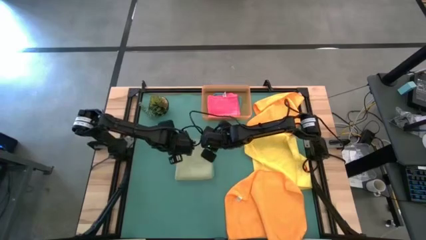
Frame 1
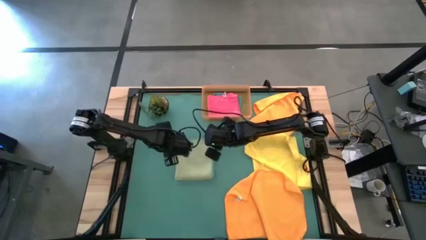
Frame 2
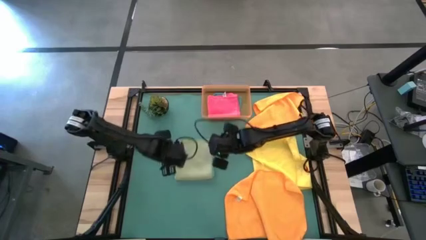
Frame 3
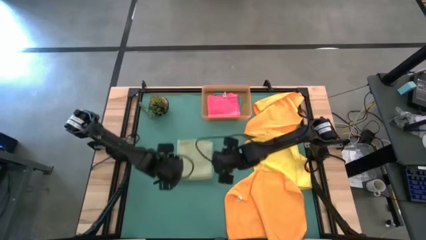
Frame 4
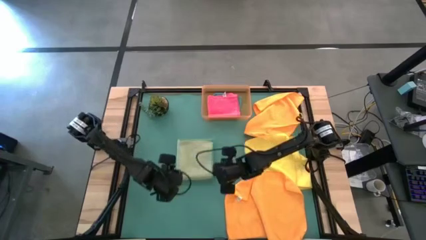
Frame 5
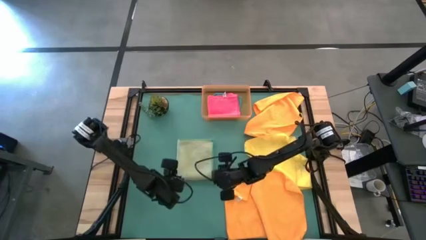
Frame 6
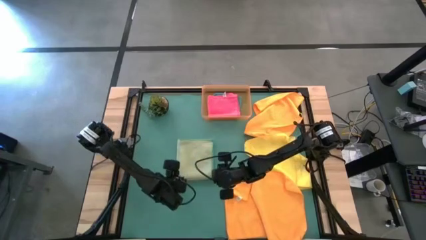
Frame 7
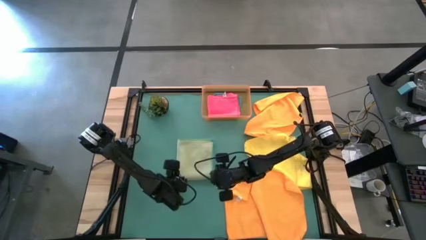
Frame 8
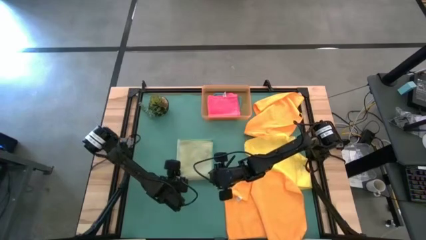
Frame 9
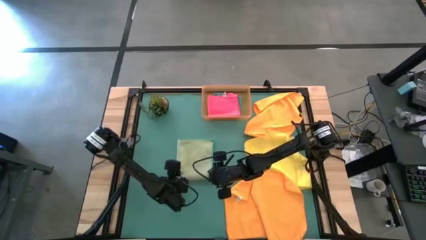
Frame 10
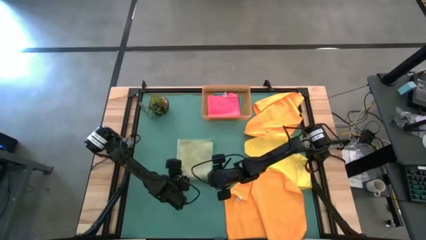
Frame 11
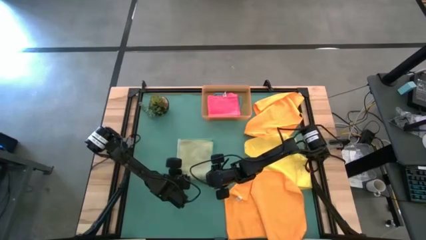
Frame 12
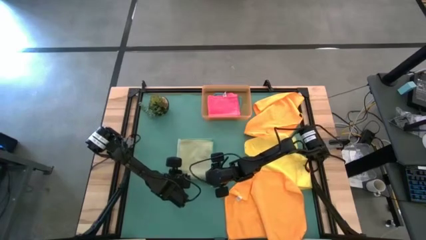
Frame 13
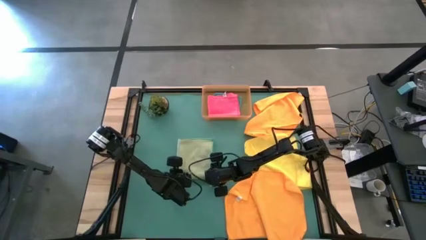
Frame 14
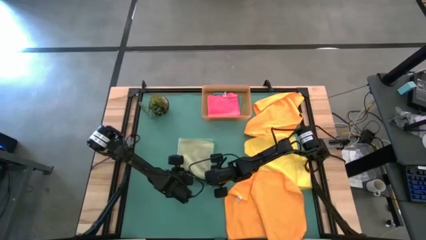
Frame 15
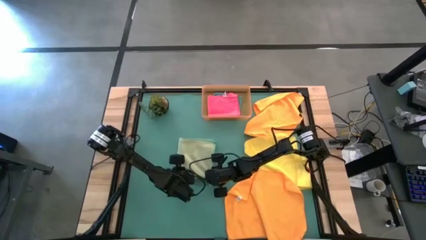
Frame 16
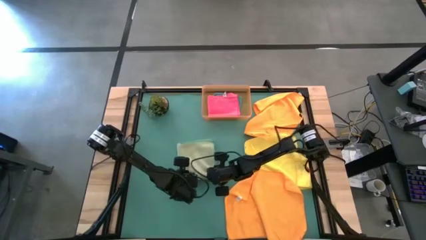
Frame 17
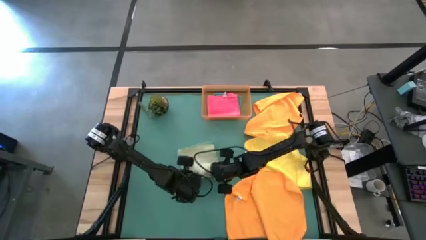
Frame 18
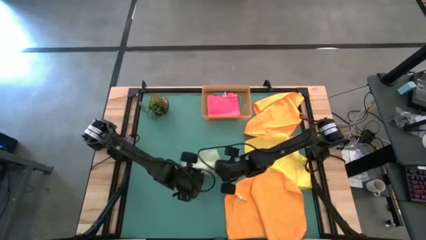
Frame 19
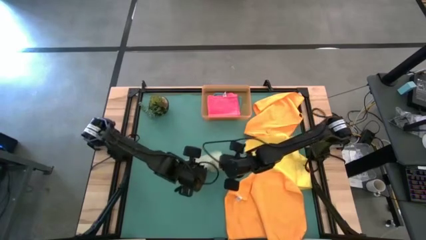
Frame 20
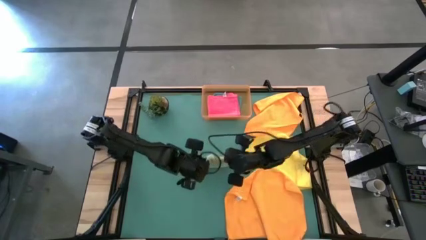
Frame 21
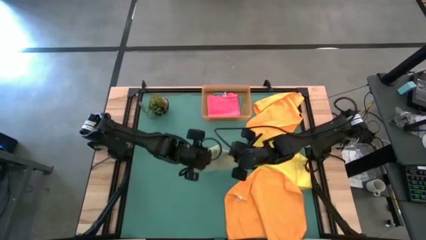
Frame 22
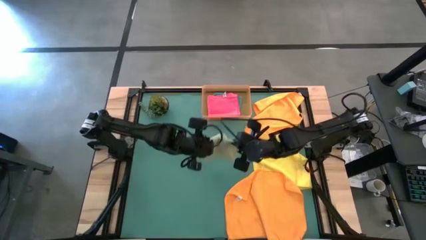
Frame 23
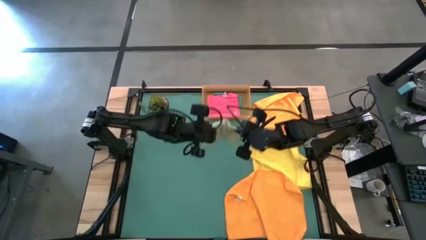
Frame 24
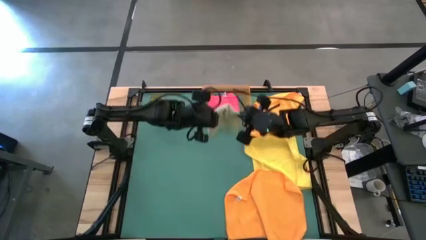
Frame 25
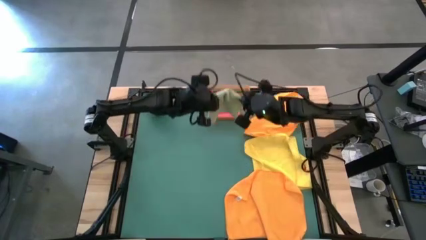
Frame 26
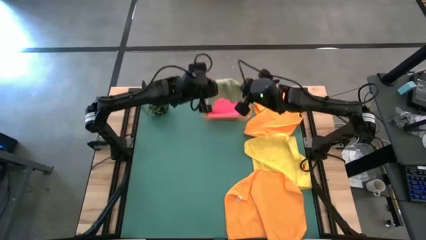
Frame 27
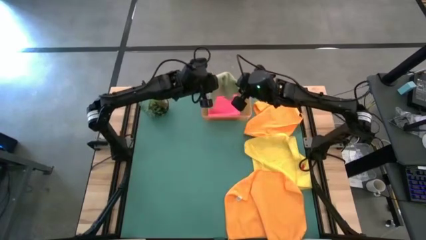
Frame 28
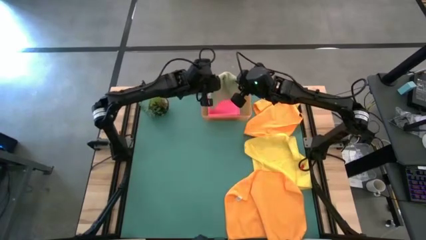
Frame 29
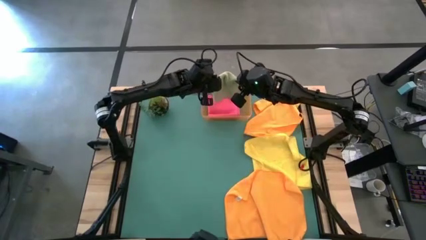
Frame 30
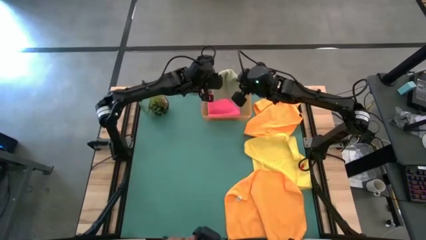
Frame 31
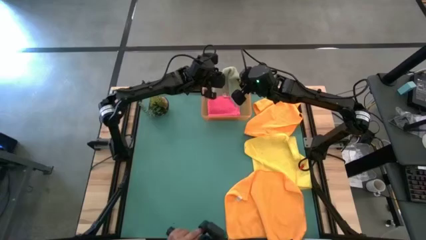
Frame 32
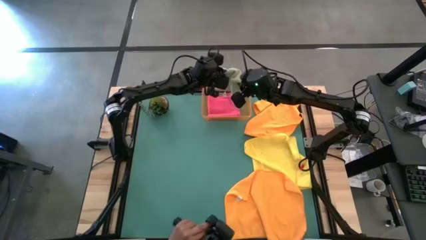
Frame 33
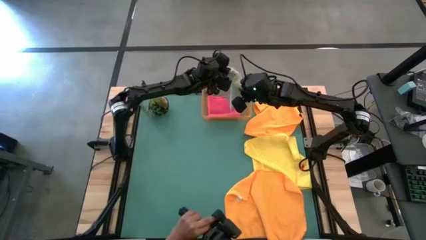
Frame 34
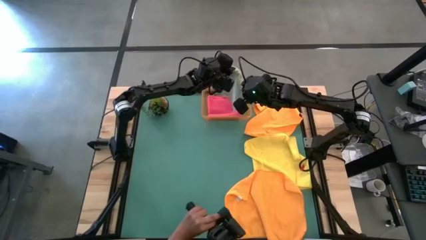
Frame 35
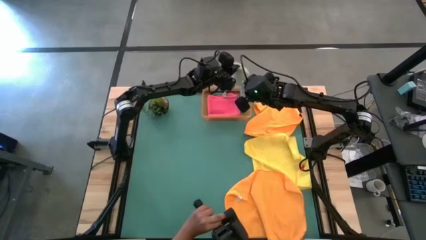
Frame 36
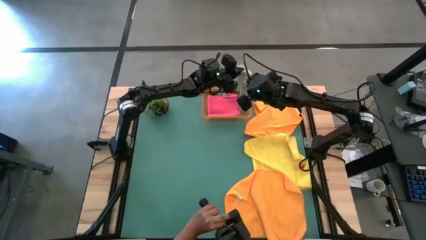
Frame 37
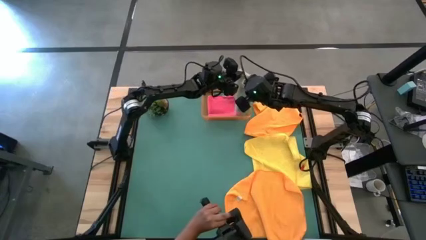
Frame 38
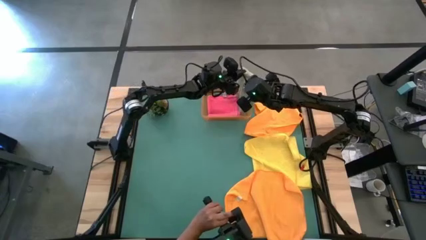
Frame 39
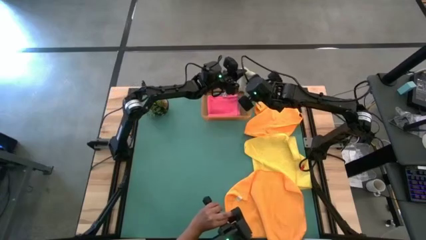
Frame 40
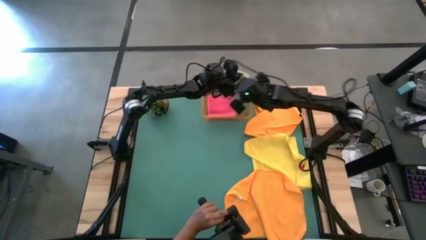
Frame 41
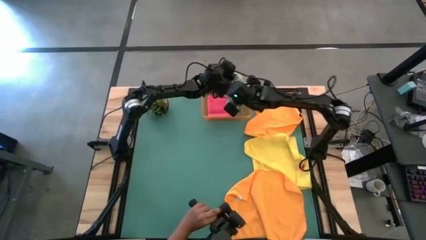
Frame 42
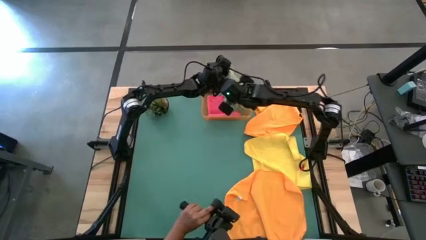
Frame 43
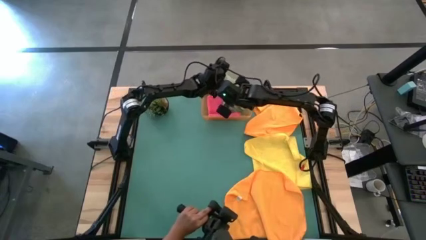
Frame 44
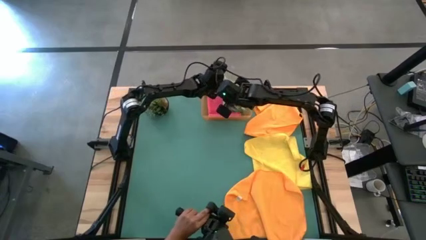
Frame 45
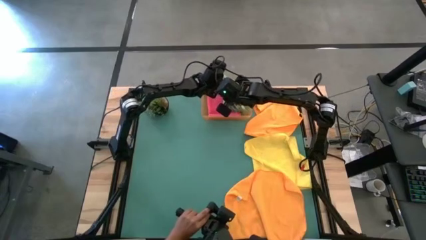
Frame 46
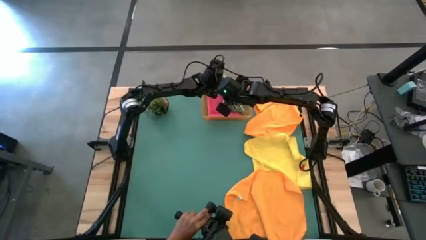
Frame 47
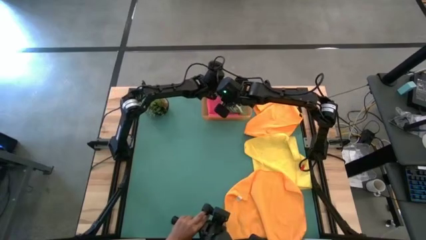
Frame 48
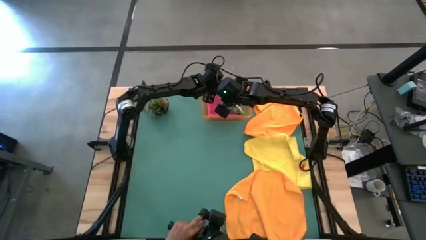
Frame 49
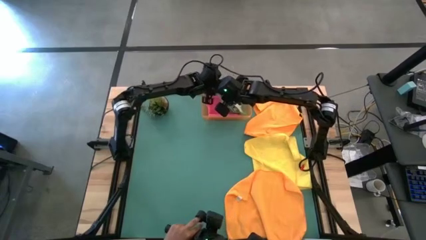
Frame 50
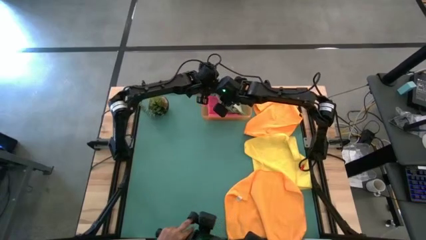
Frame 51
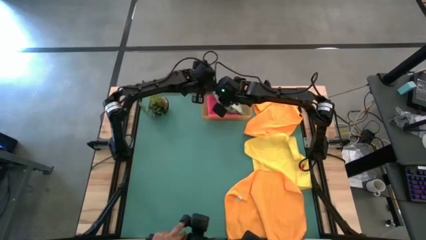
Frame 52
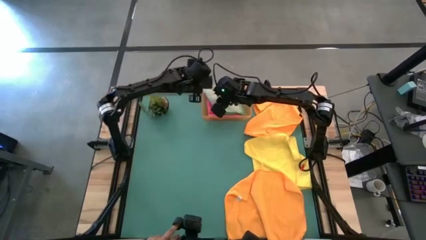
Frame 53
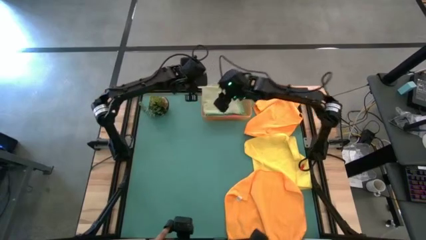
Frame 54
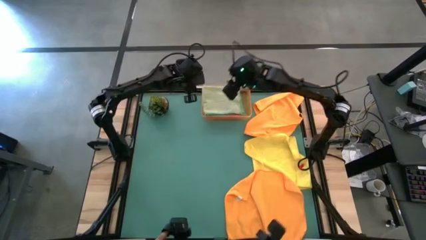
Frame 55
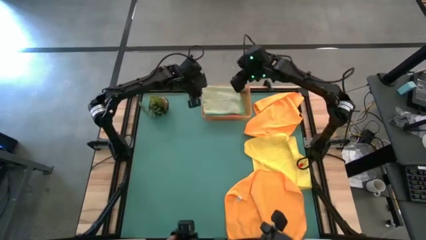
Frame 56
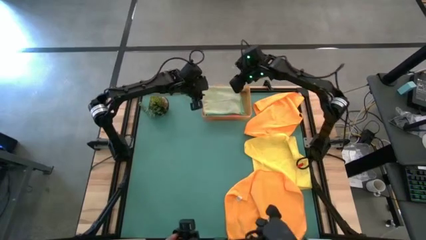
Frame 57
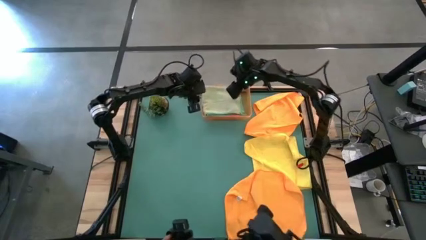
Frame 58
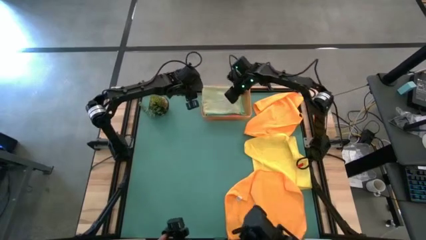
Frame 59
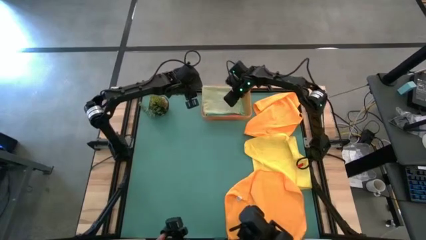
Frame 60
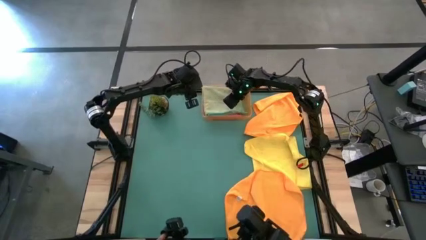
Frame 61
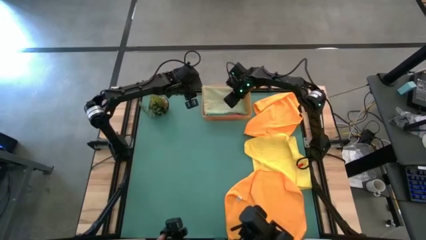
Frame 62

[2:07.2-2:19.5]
Task: Fold microfiber towels
Stack the green microfiber towel on top of the pink microfiber towel in the orange bin

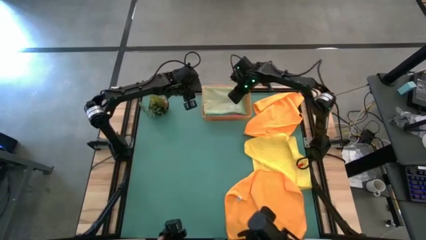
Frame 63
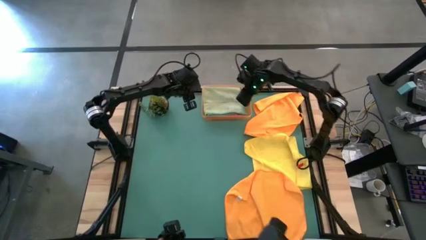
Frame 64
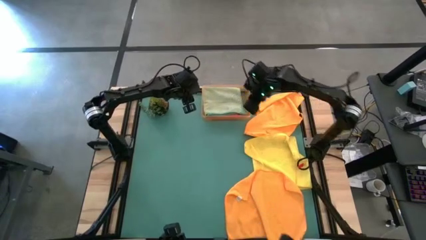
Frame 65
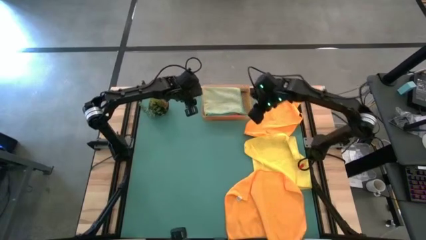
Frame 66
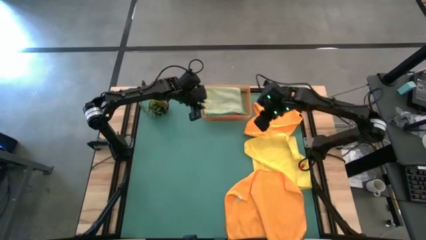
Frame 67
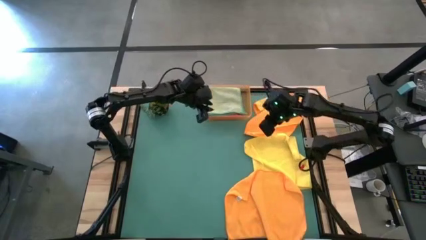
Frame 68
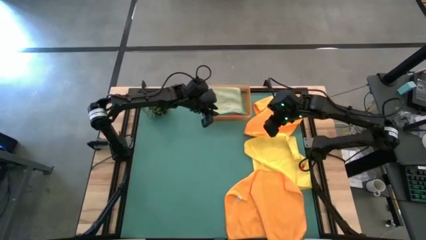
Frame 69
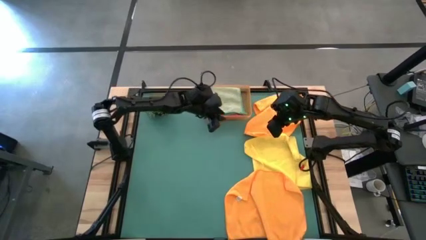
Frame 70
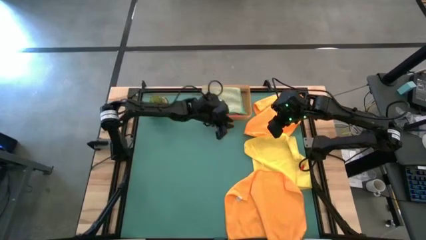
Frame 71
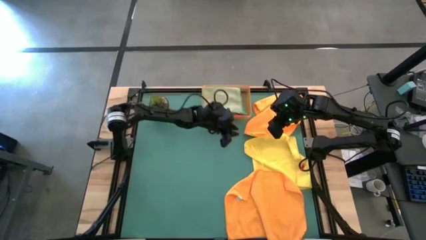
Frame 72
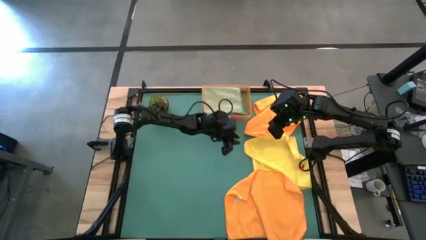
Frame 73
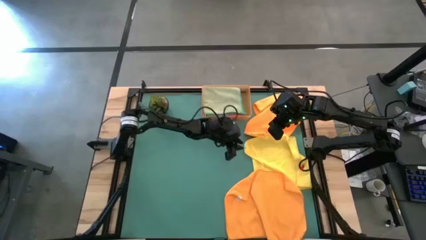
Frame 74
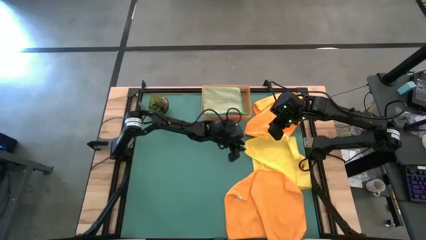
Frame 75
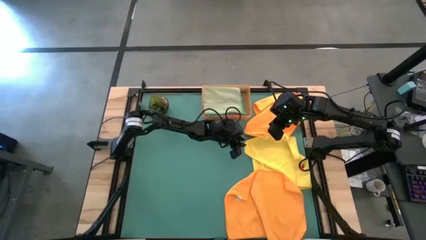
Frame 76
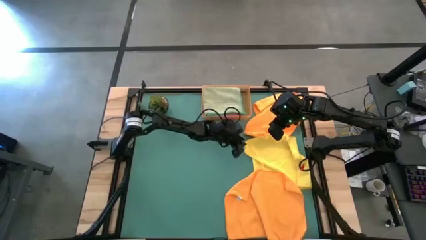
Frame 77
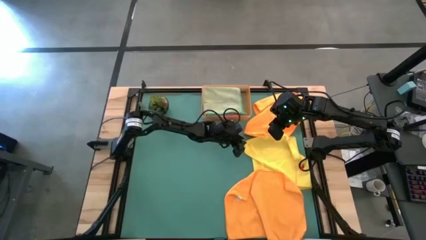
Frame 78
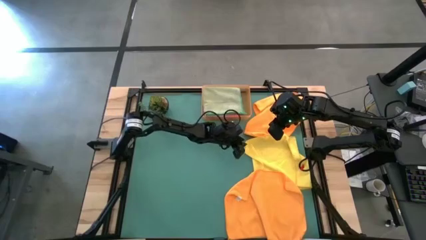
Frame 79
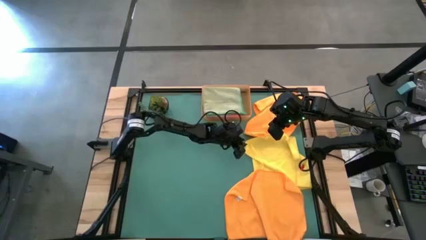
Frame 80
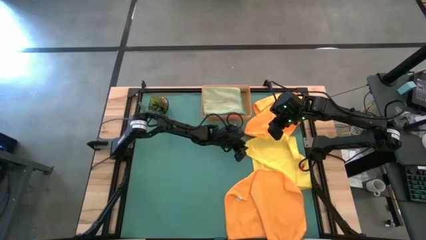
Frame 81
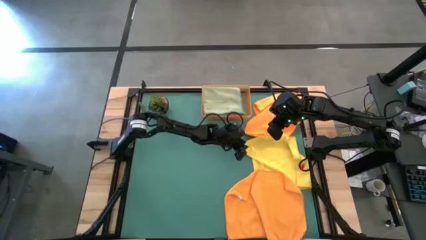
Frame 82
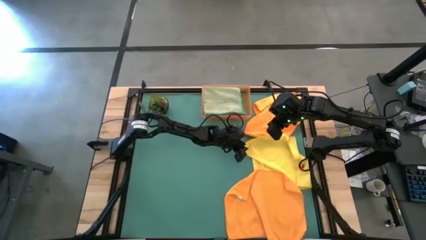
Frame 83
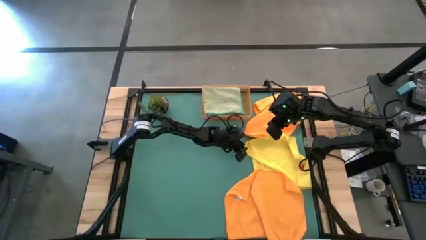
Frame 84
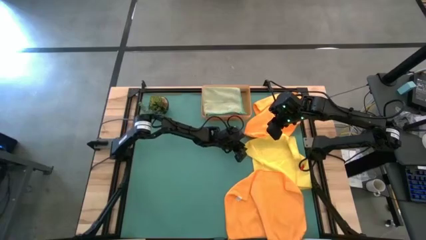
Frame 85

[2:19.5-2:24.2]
Fold the yellow microfiber towel

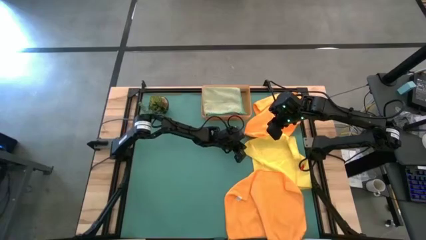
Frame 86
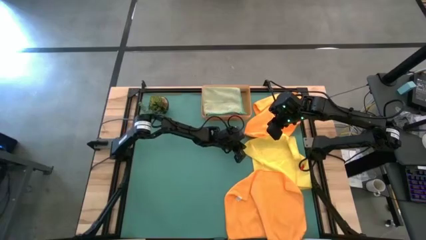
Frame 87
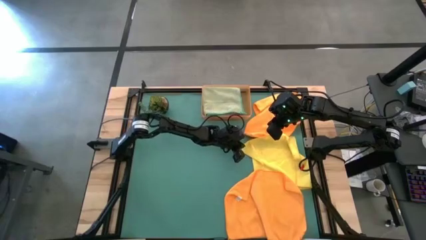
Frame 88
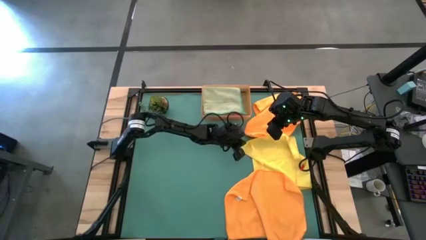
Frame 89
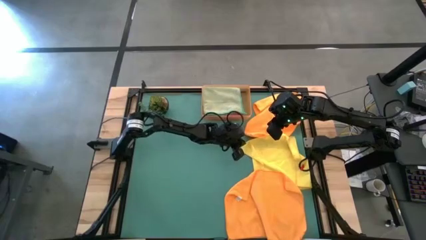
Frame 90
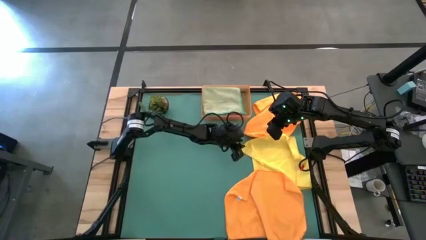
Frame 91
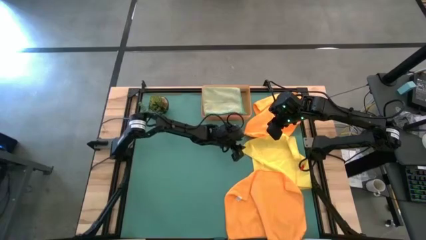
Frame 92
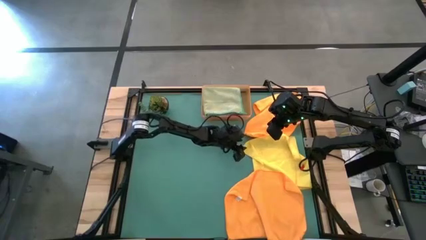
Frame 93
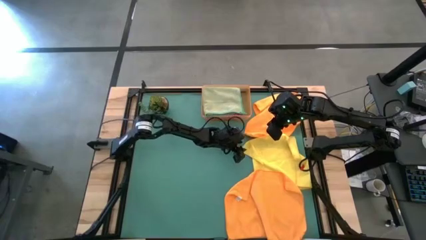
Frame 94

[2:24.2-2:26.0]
Fold the yellow microfiber towel
